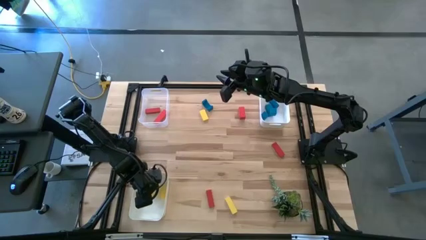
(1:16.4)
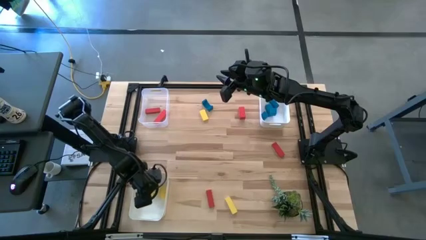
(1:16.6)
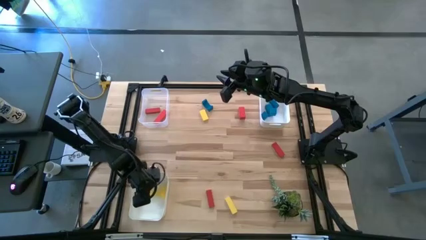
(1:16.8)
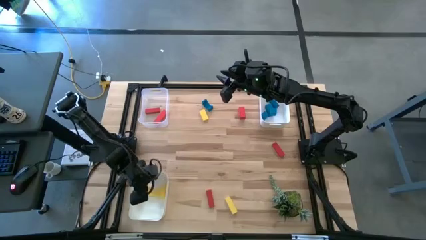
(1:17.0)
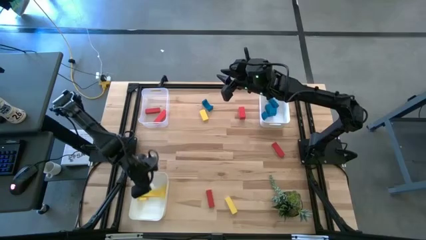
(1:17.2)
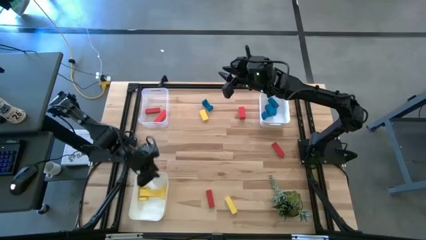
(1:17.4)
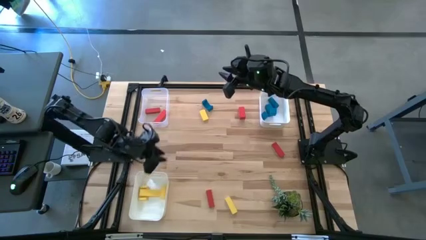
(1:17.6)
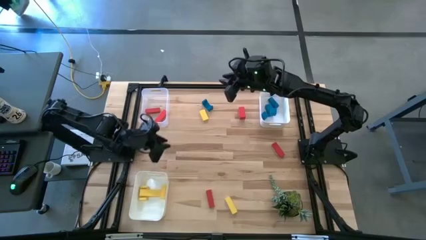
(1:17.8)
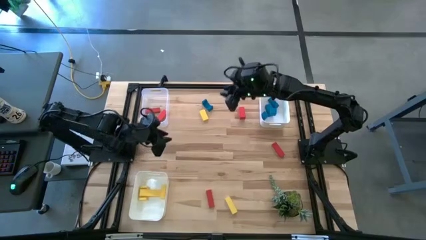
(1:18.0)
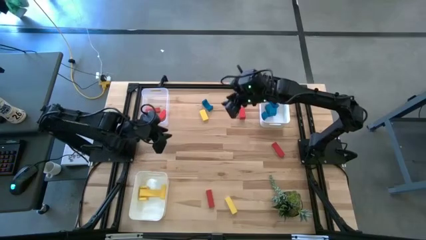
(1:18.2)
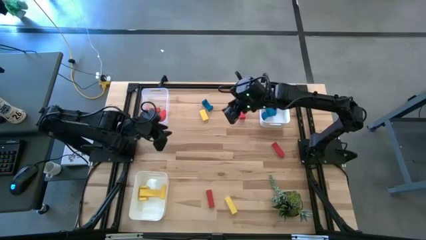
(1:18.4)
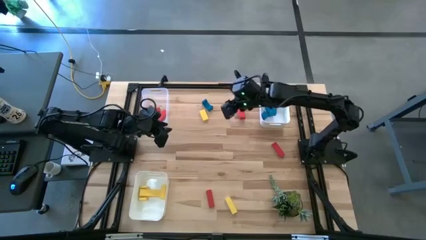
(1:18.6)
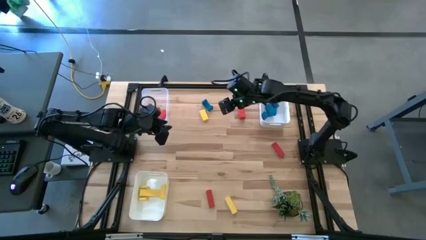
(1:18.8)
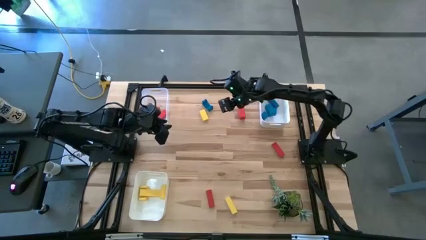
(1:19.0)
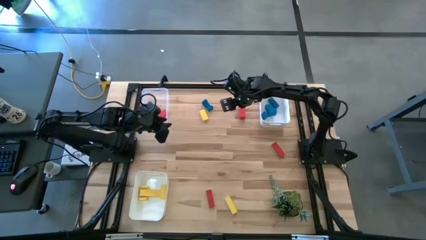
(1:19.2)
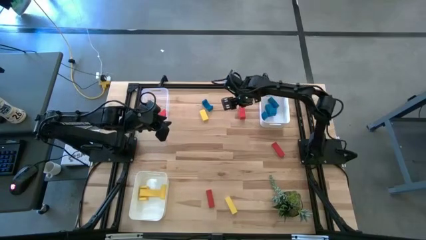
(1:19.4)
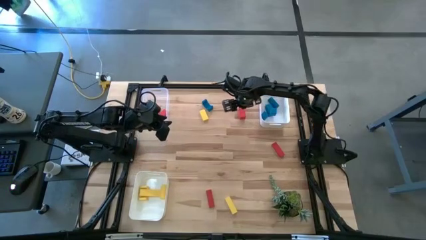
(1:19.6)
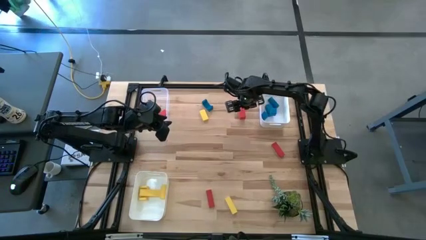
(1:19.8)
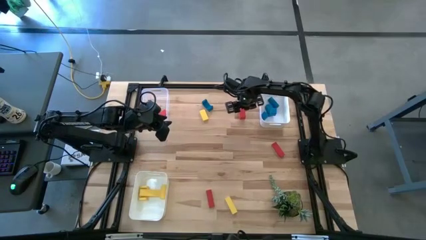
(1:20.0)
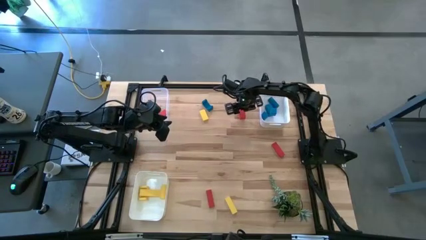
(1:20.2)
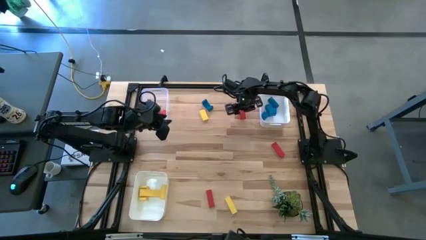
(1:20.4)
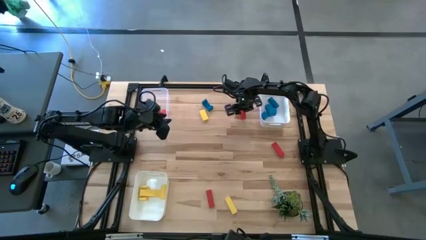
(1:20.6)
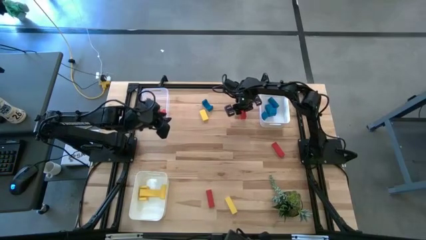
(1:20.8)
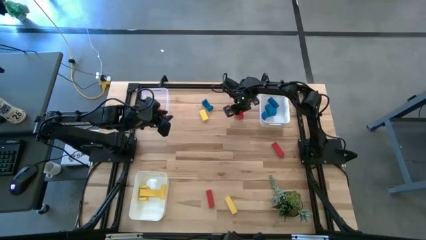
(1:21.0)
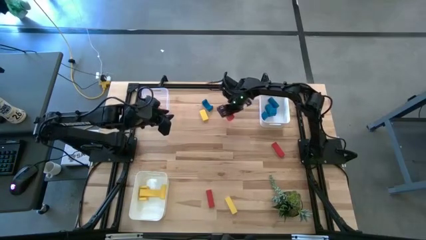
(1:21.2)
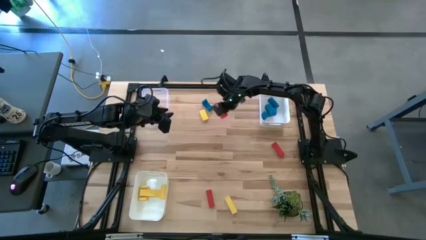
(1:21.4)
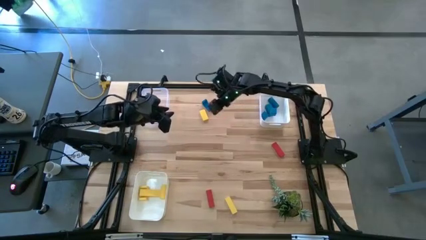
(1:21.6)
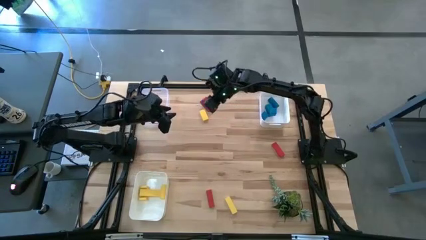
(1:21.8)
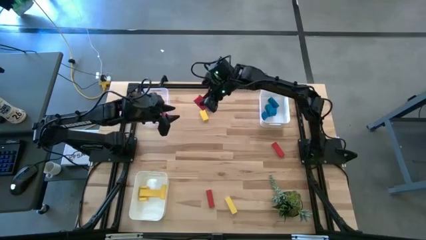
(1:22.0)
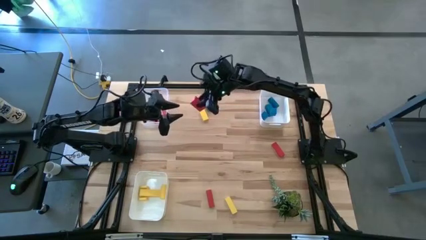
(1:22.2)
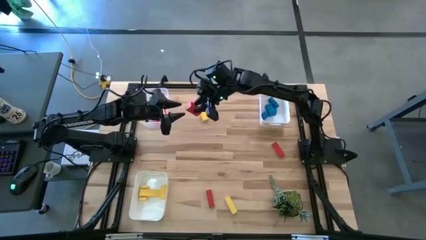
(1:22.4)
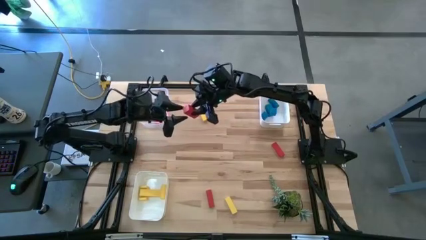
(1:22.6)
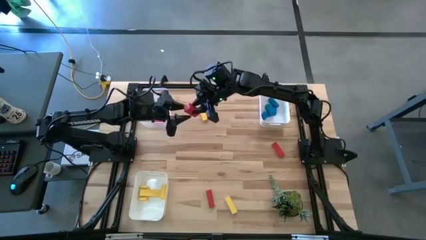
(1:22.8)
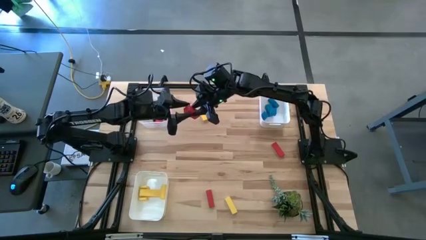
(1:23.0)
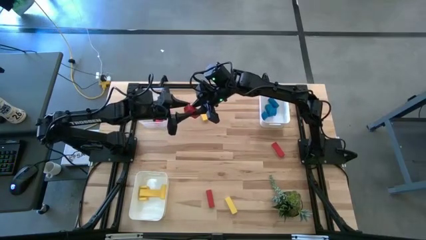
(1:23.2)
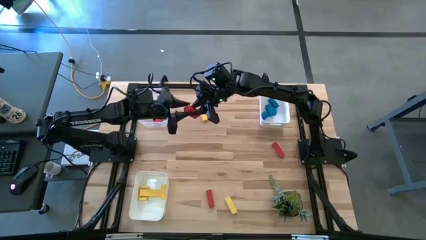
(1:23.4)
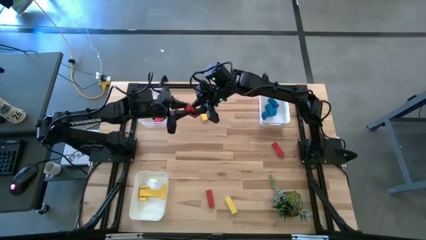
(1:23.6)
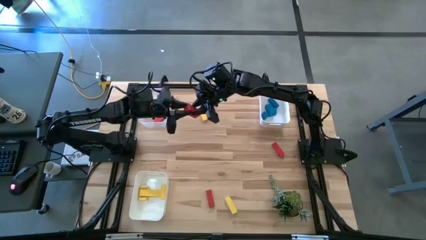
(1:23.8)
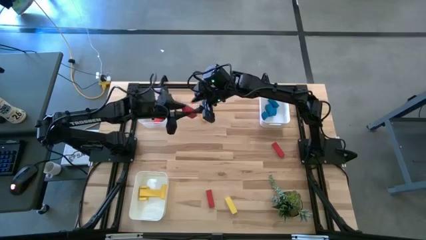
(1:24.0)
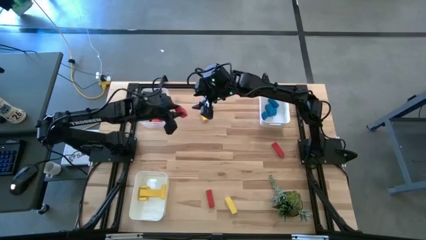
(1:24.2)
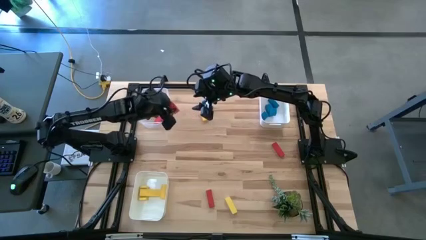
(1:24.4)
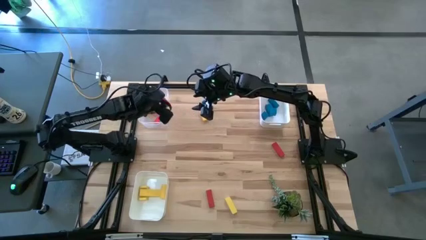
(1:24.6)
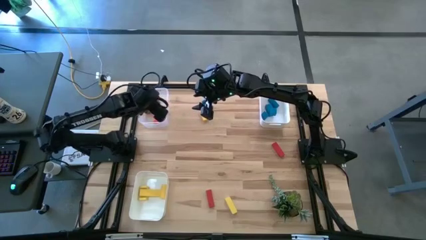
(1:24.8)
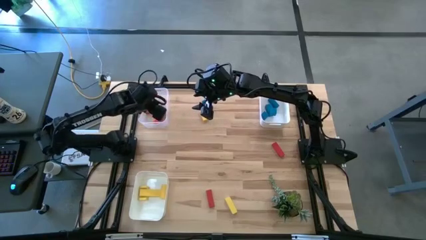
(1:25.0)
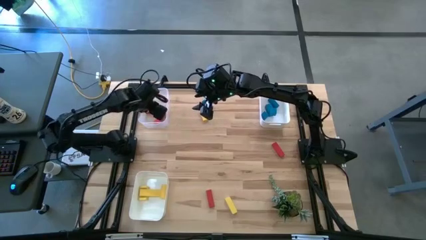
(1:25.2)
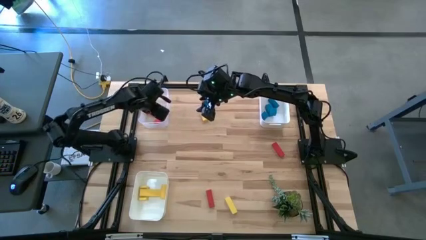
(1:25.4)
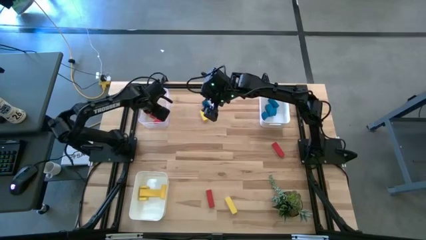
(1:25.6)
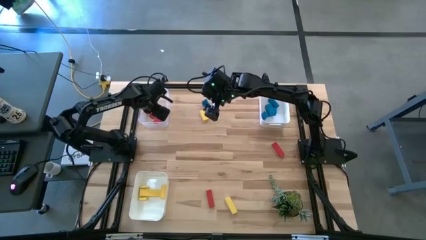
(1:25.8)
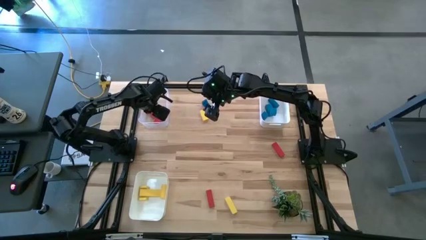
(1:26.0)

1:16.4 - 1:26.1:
Task: Sort & place blocks by color
Put the red block into the transparent bin

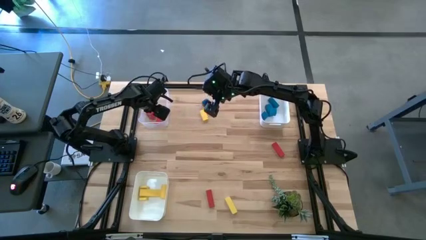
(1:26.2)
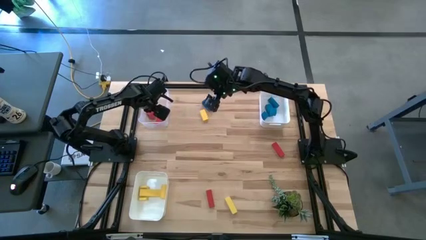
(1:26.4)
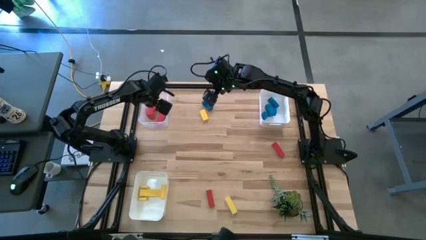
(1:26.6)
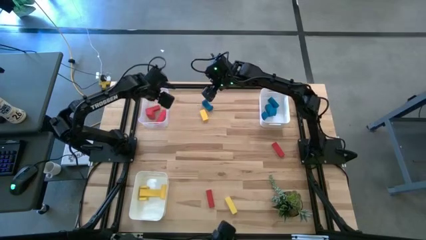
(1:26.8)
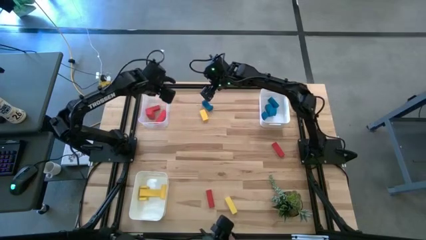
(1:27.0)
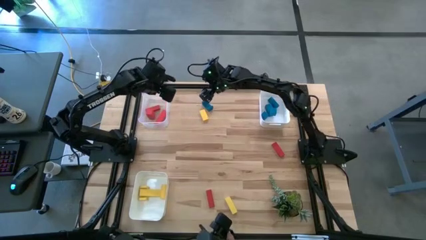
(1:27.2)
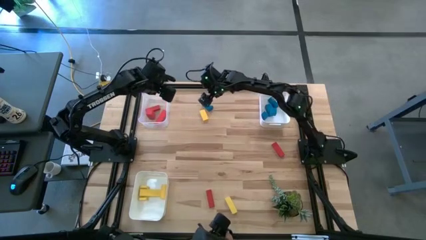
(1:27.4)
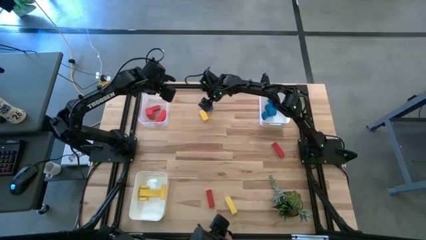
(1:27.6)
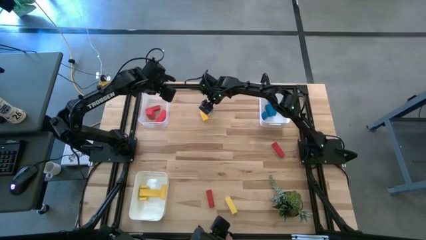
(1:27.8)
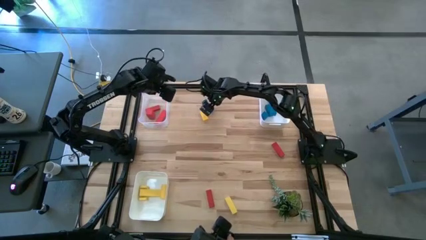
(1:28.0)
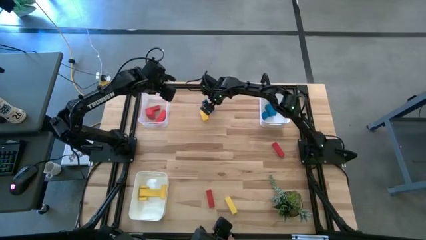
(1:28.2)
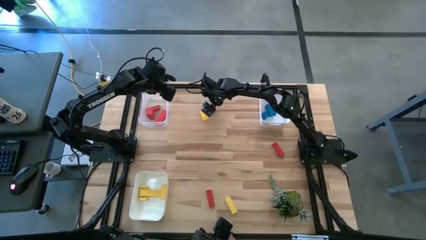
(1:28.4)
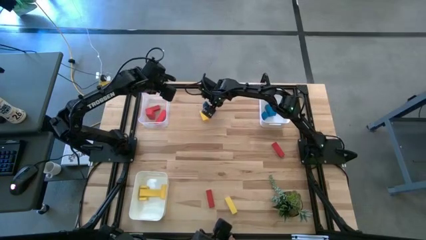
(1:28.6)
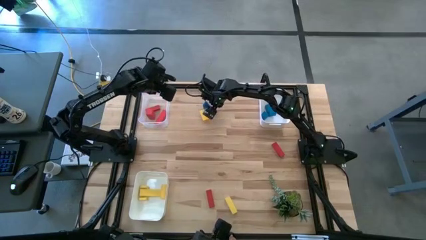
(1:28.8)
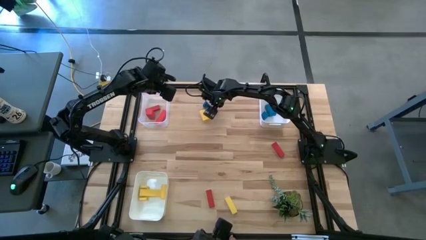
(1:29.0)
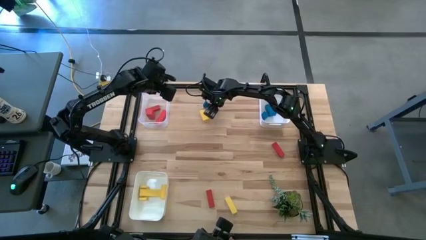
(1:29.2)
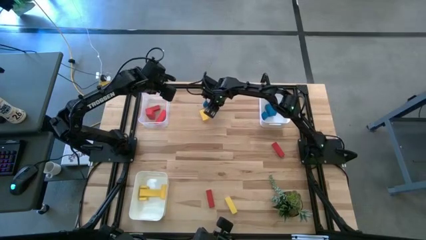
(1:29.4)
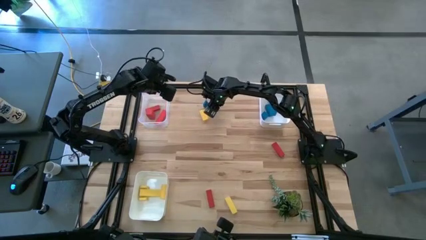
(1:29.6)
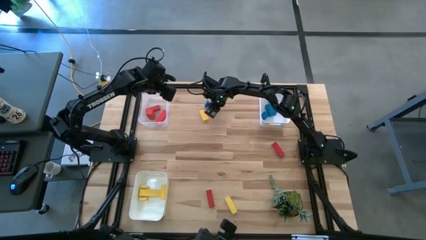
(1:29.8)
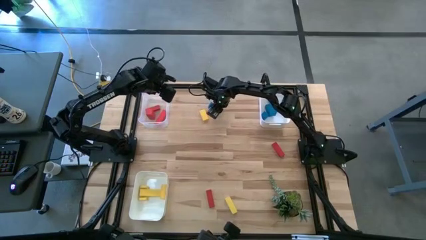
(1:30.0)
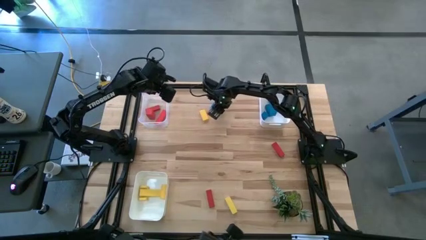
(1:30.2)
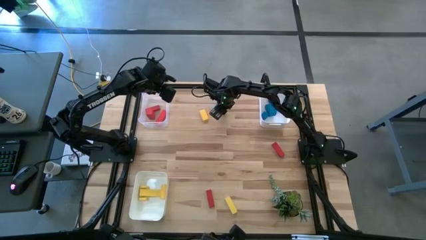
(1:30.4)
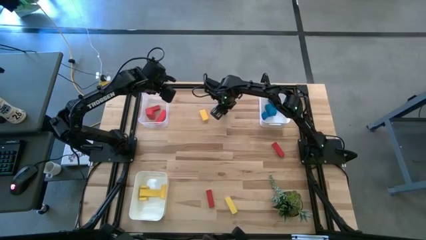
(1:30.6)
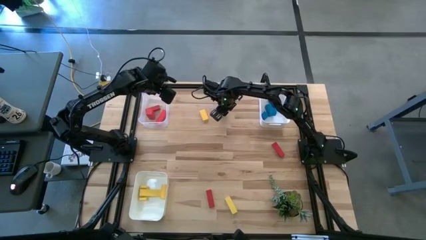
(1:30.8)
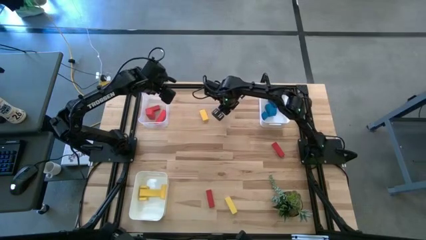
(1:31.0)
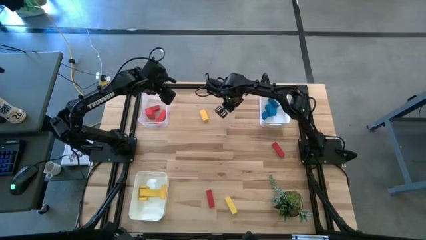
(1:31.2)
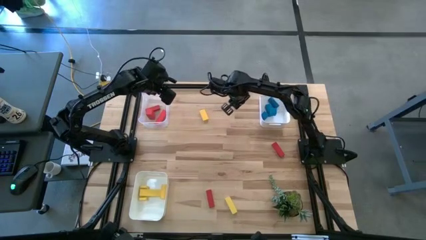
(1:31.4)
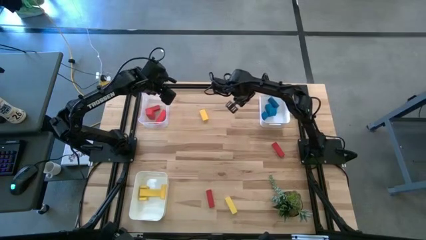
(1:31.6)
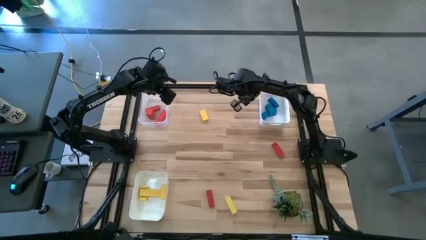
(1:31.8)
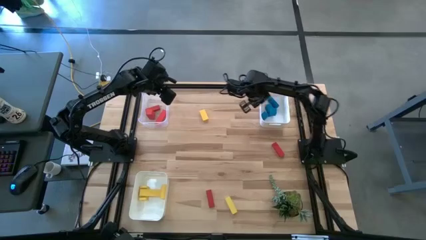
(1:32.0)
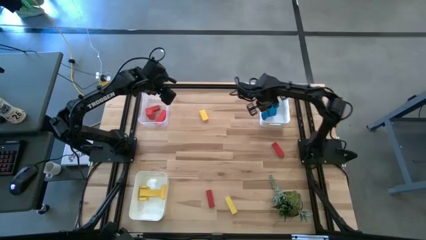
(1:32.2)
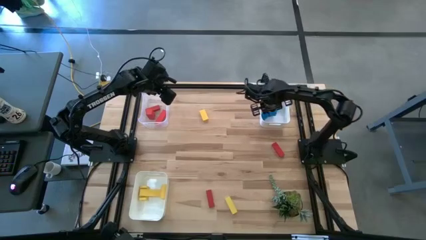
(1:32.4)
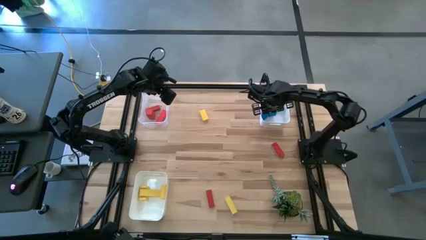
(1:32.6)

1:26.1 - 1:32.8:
Put the blue block into the top white bin
